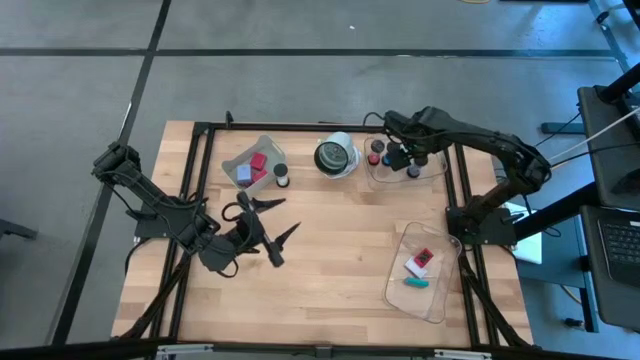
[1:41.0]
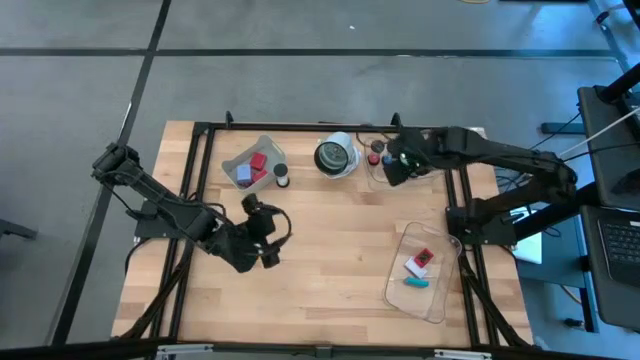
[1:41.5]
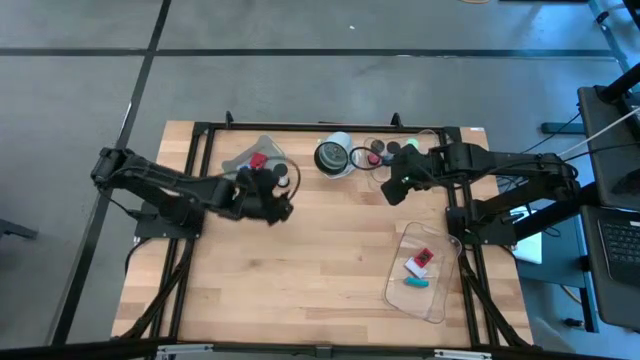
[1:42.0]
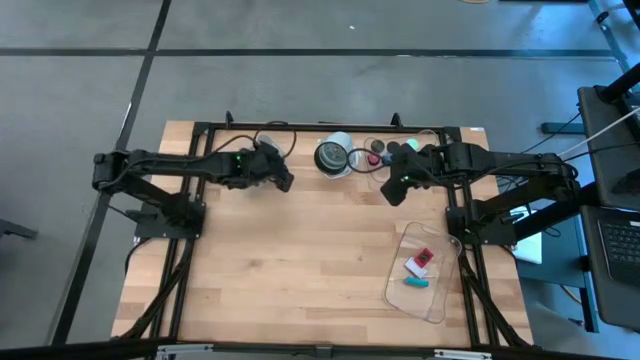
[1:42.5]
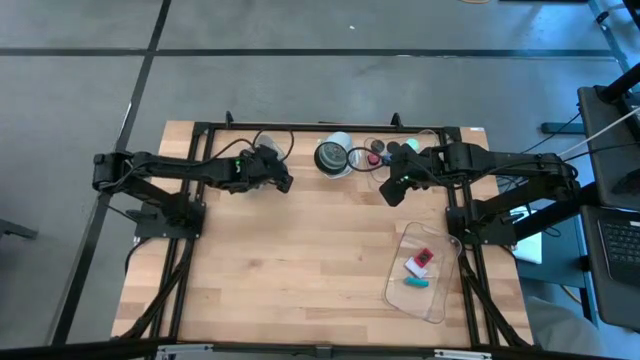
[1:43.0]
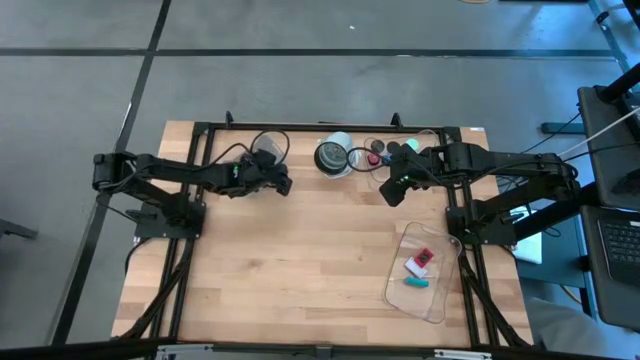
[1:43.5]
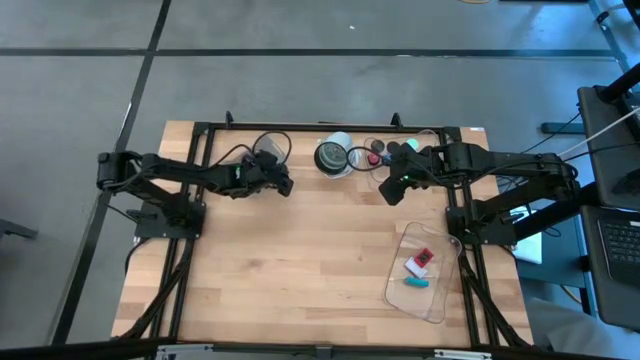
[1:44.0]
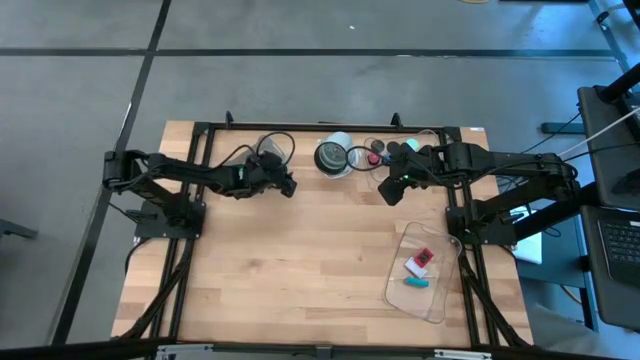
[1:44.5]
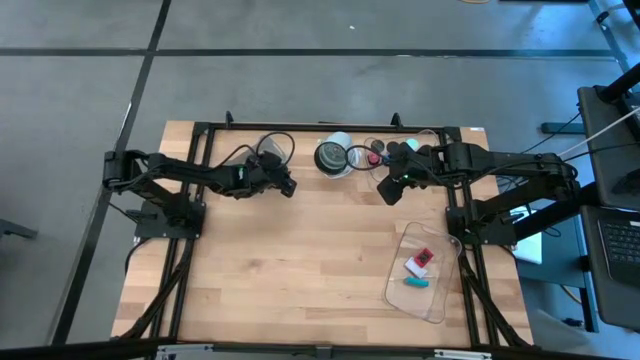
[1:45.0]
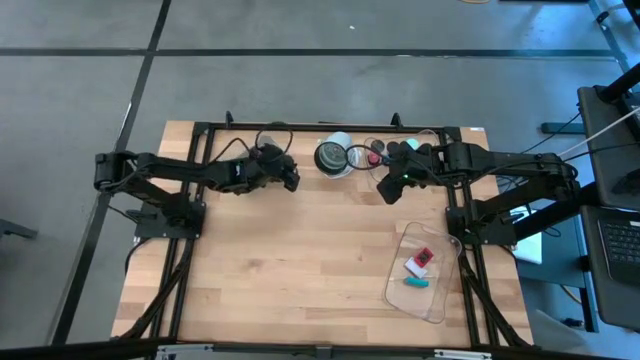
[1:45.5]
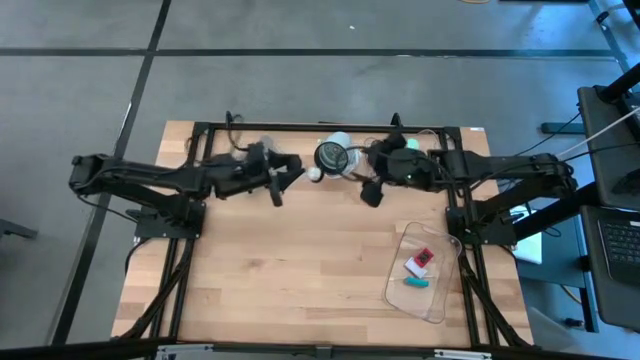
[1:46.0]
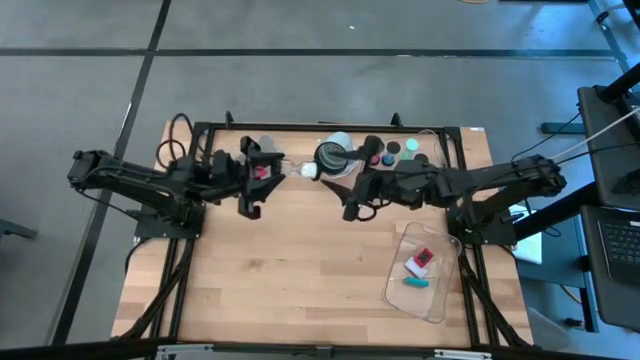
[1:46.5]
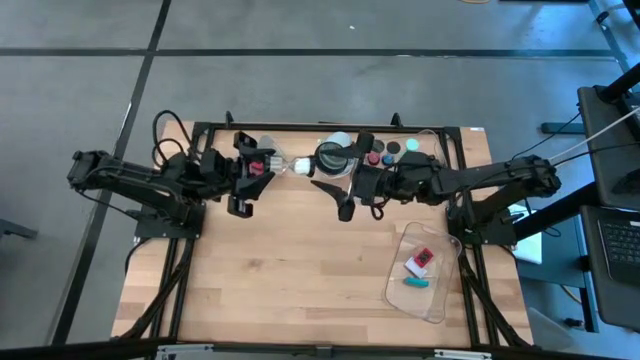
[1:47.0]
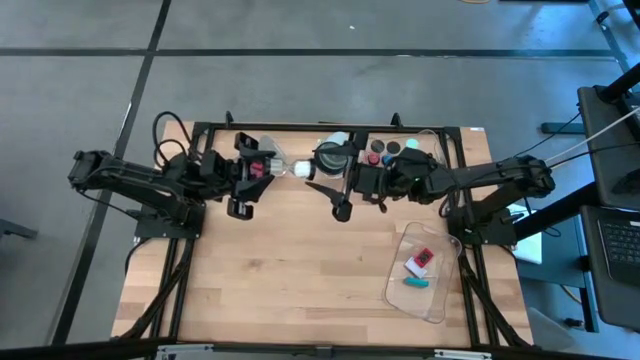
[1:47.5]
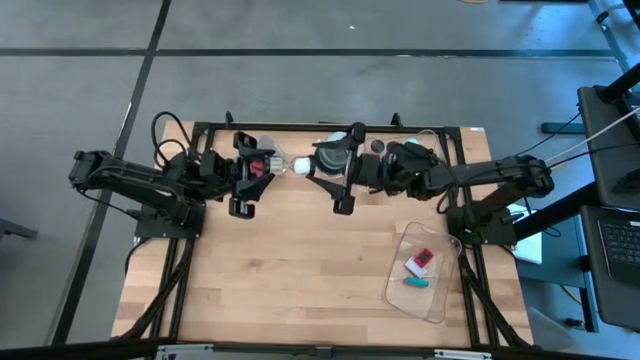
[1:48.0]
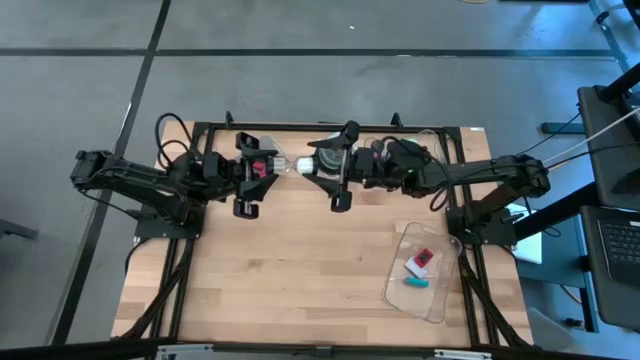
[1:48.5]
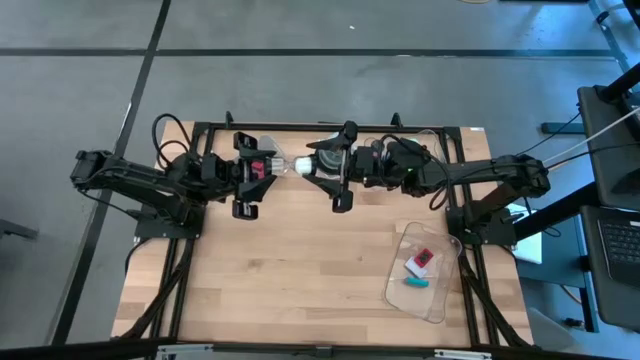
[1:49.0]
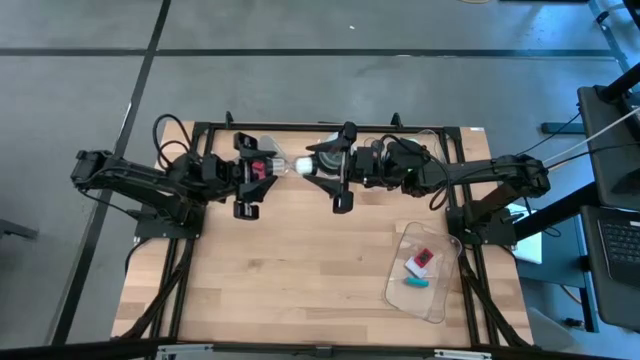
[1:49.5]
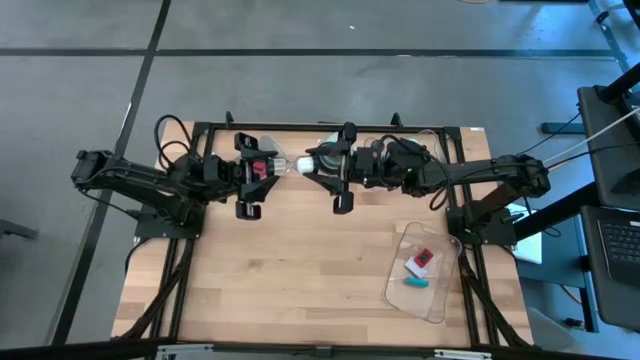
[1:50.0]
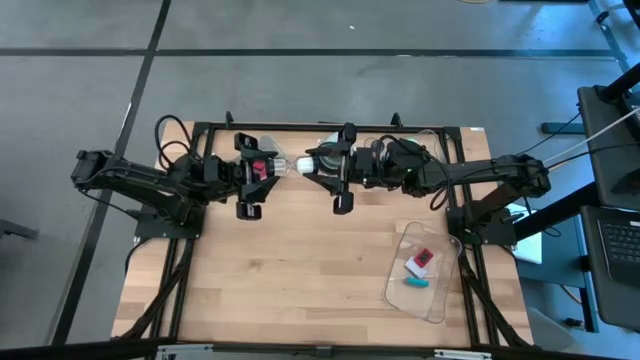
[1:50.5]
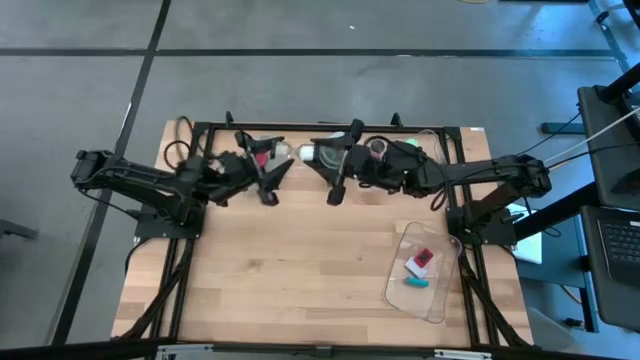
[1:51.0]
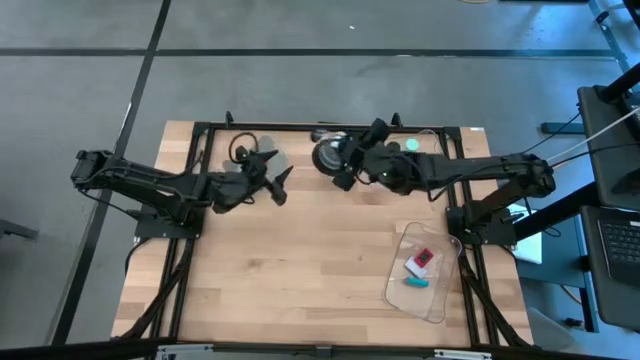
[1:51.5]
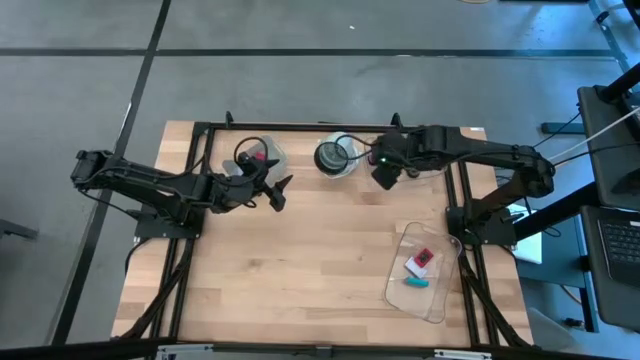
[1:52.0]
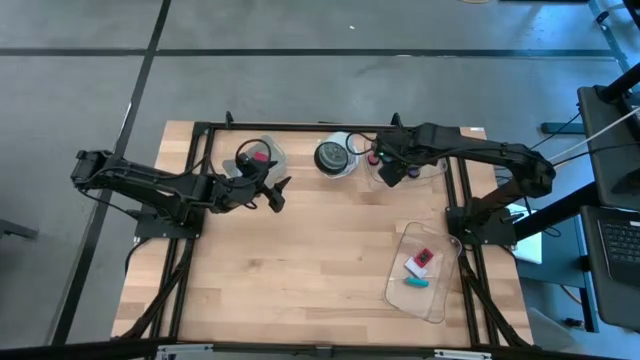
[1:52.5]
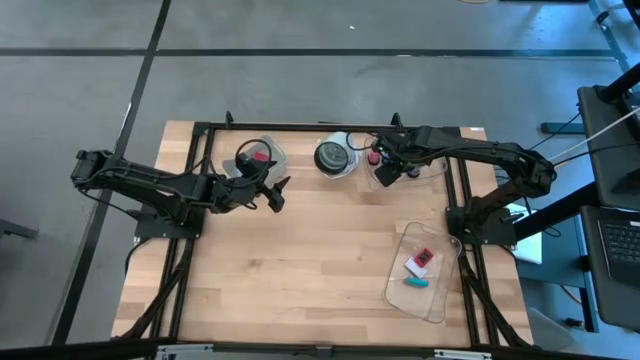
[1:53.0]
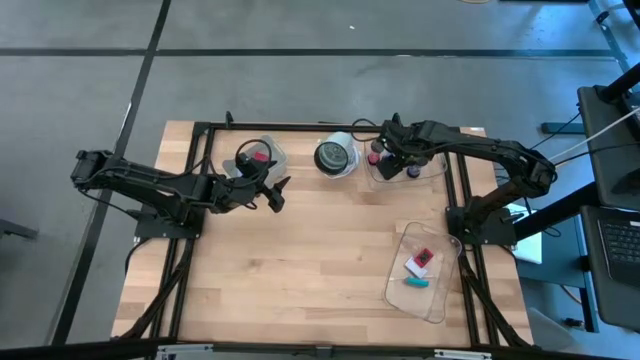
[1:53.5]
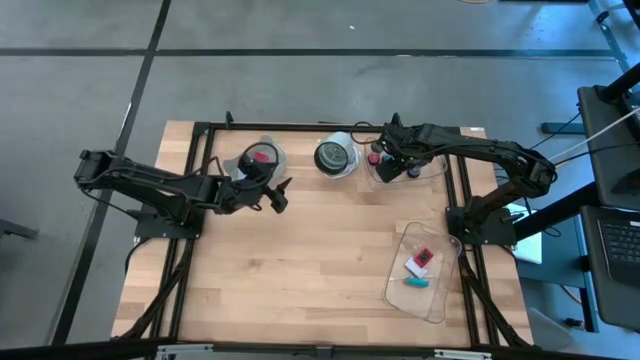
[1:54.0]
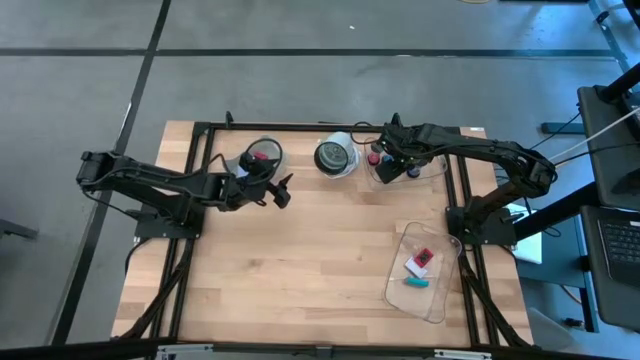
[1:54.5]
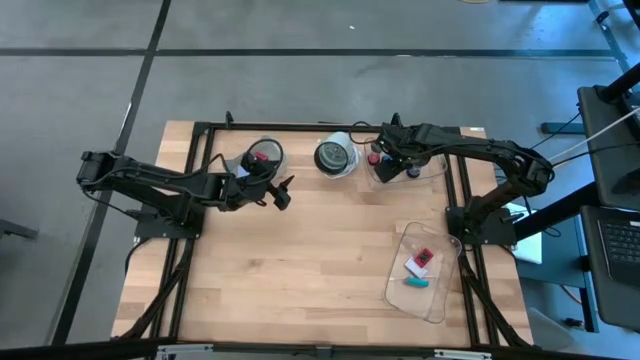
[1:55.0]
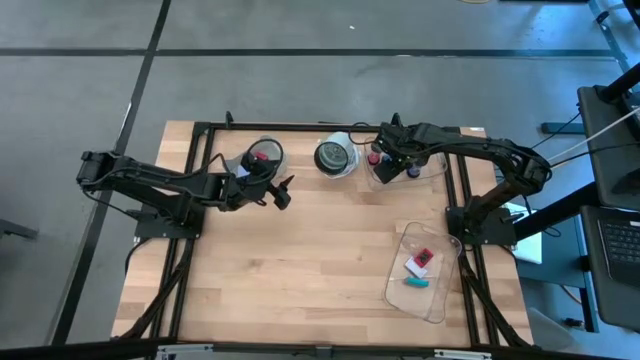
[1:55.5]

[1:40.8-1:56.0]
Task: Pick & Place Office items
Put the white hourglass into the top transparent bin

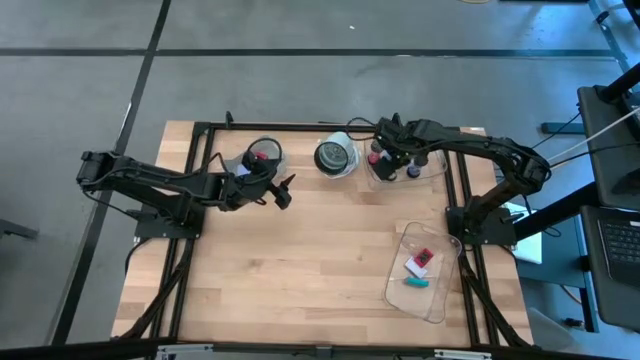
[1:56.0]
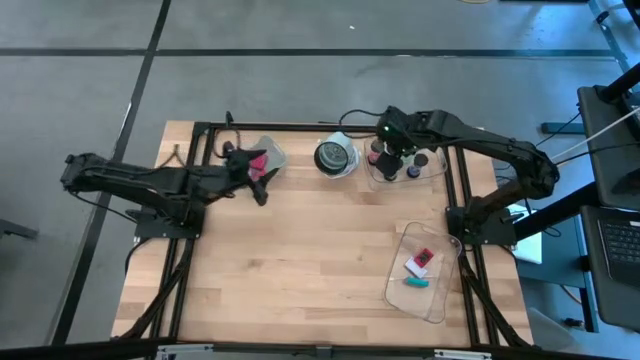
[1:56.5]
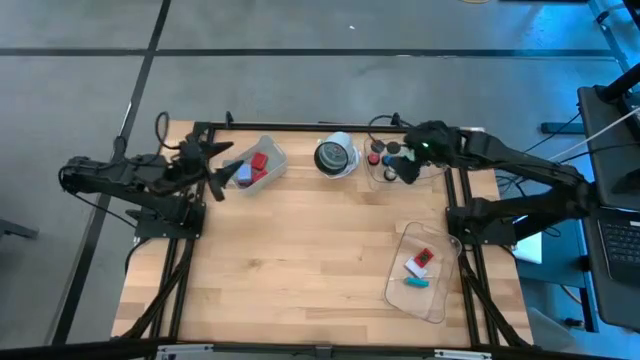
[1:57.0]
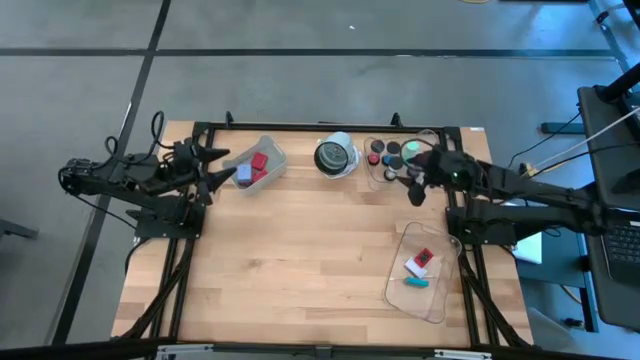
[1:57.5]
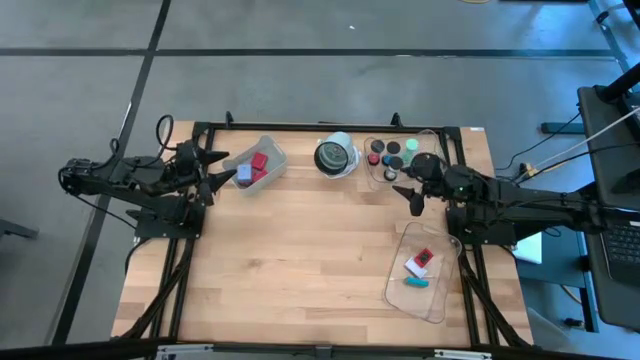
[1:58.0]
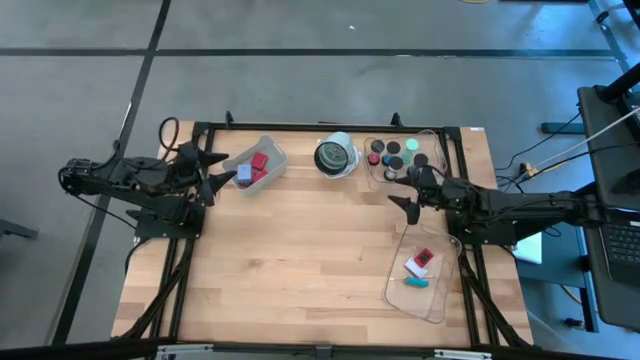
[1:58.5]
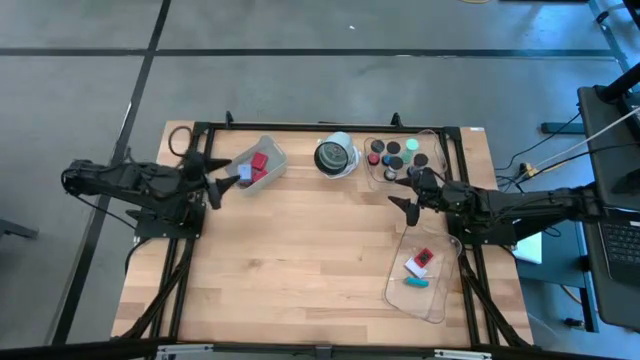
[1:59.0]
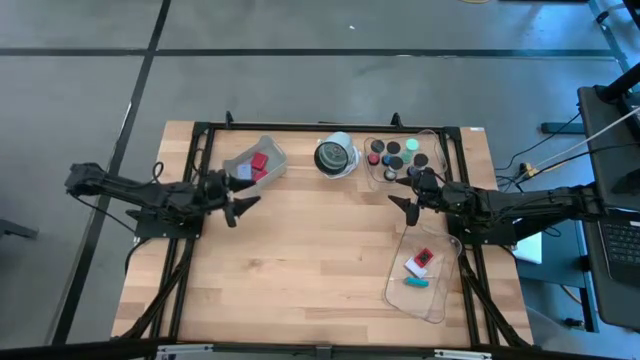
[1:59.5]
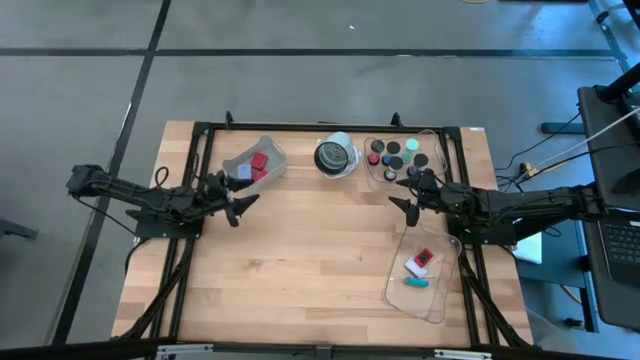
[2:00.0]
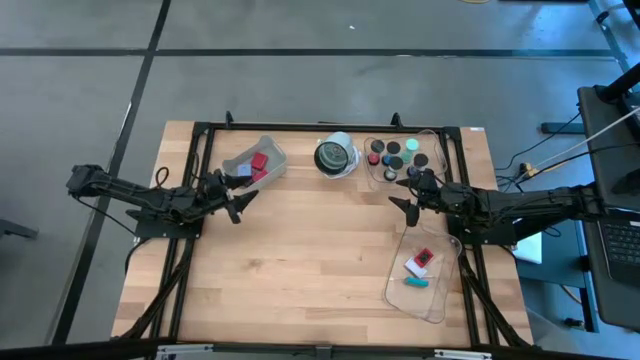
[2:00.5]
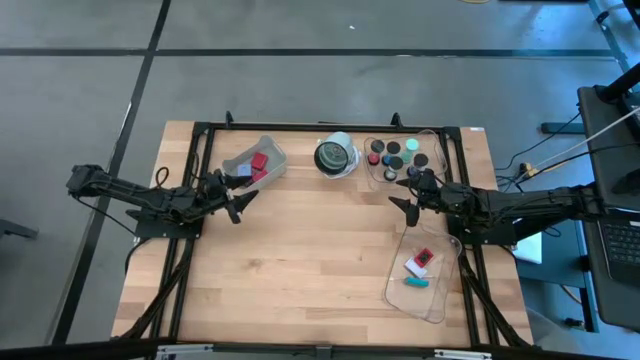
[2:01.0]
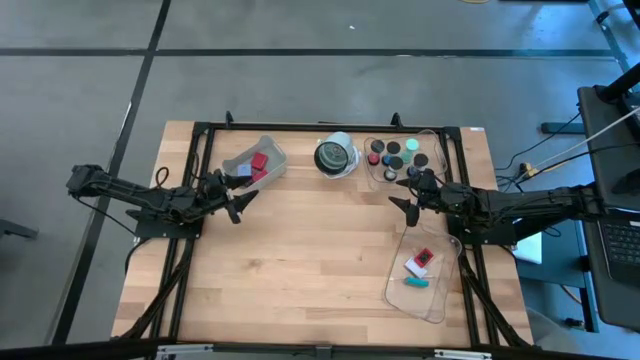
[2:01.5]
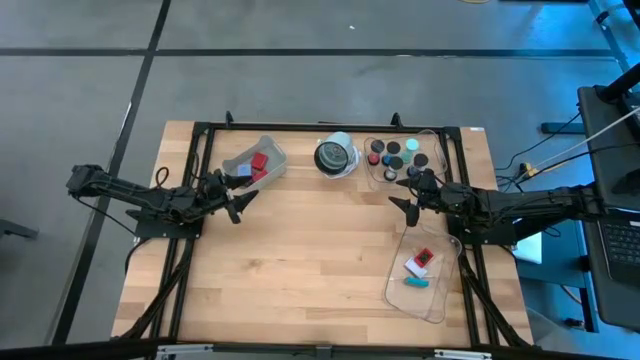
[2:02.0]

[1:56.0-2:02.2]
Return to Home Position

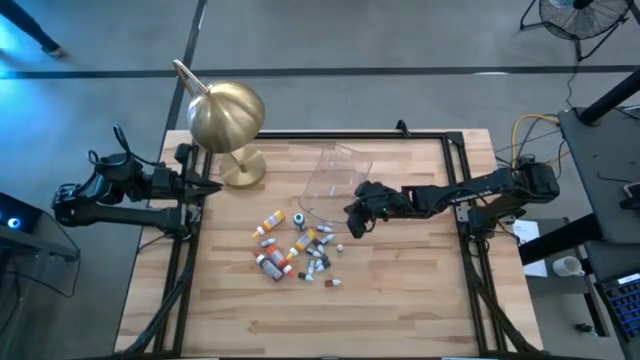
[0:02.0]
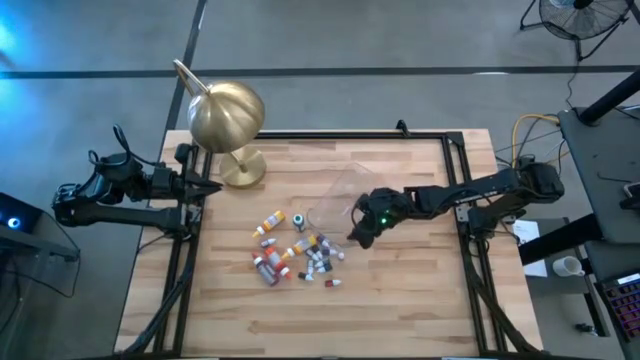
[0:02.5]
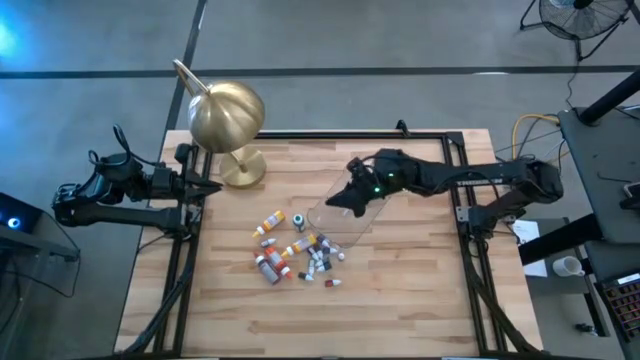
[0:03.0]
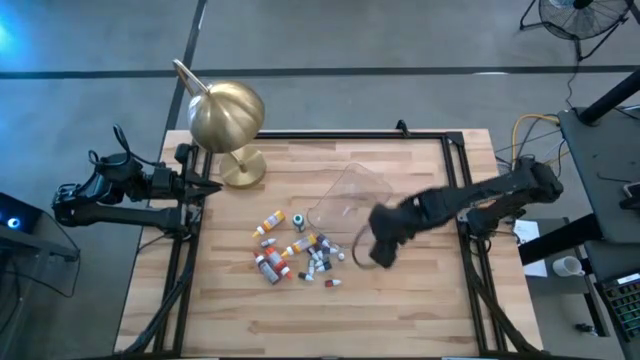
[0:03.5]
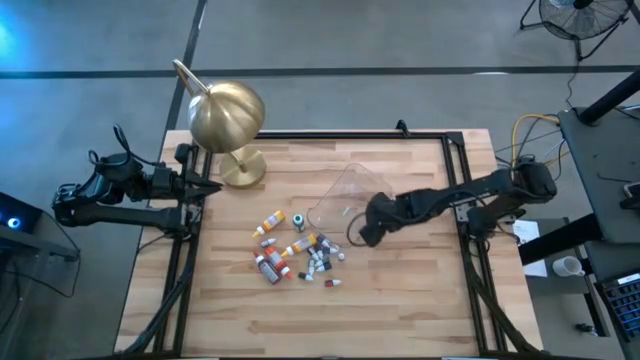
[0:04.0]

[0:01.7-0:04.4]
Task: Pick & Place food coloring
Adjust the transparent bin
